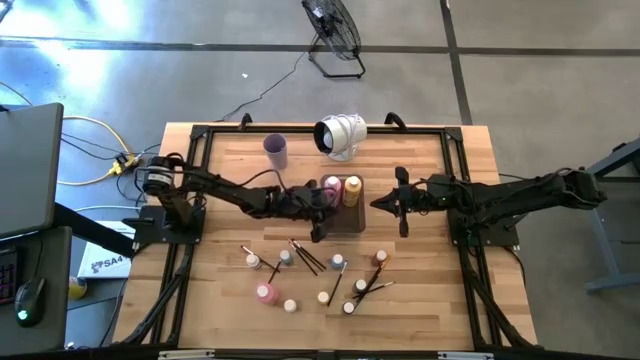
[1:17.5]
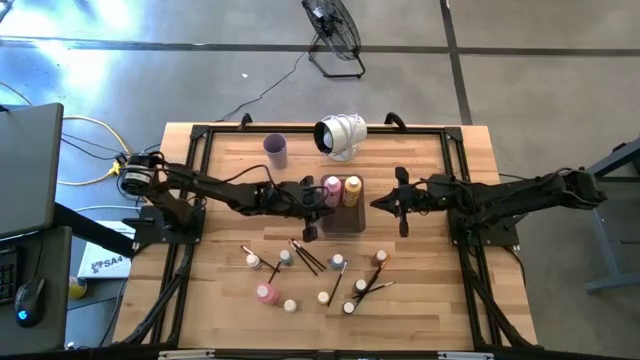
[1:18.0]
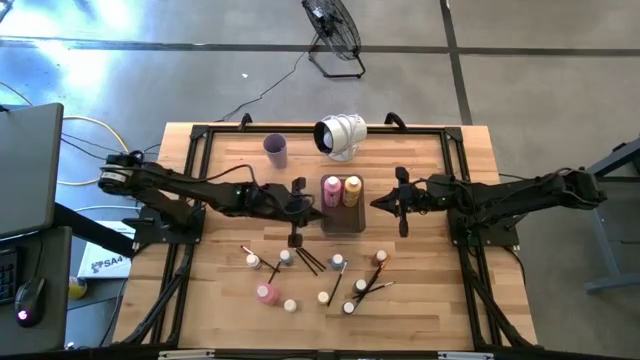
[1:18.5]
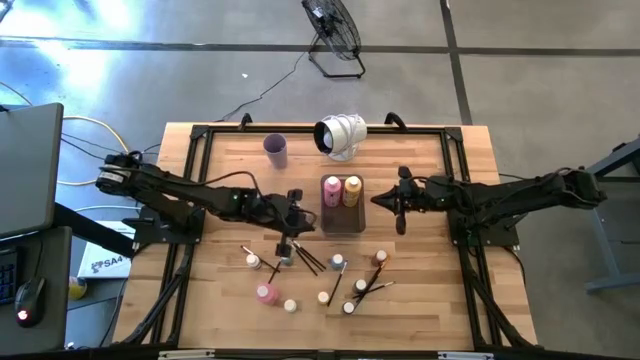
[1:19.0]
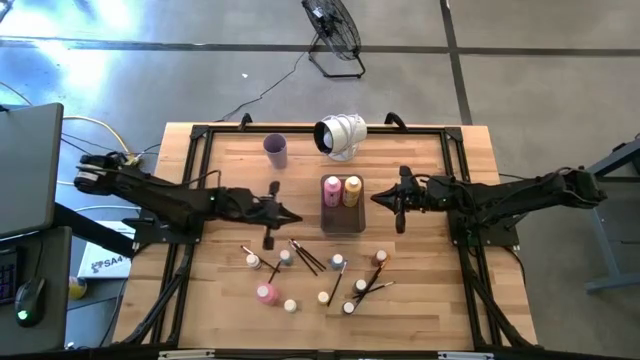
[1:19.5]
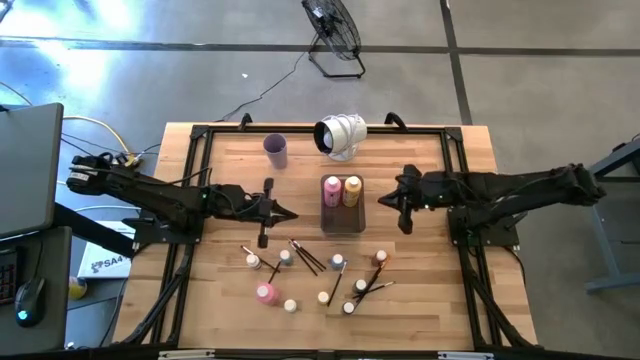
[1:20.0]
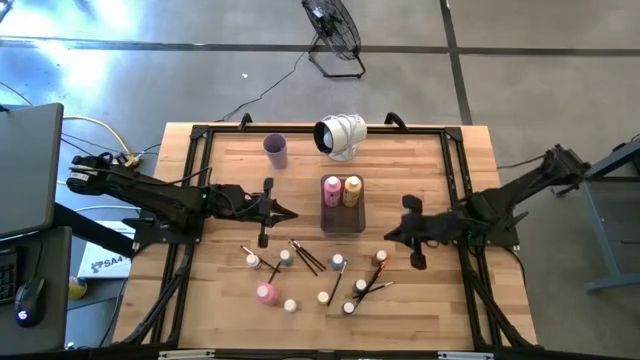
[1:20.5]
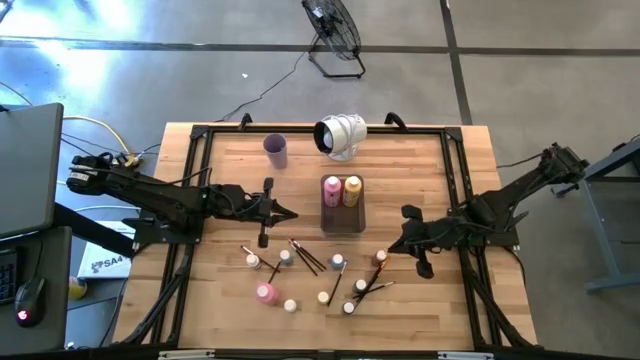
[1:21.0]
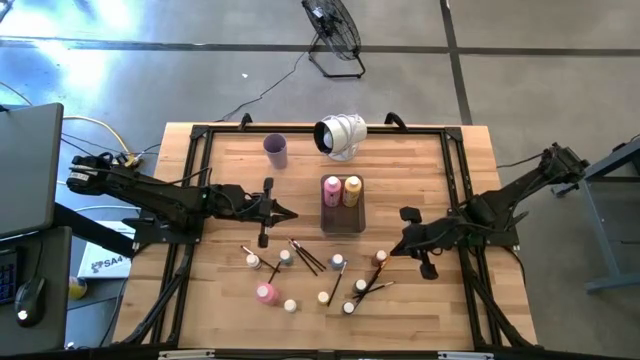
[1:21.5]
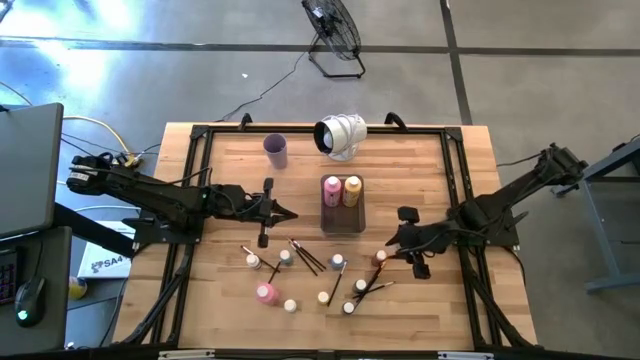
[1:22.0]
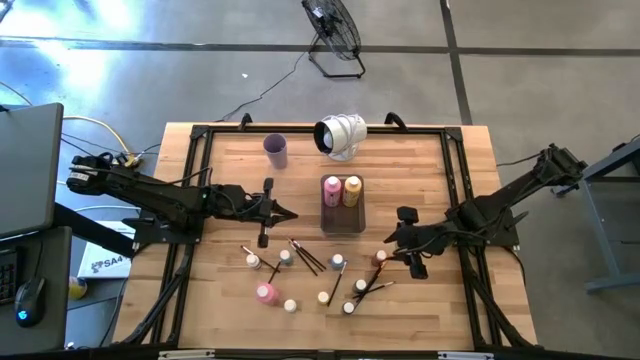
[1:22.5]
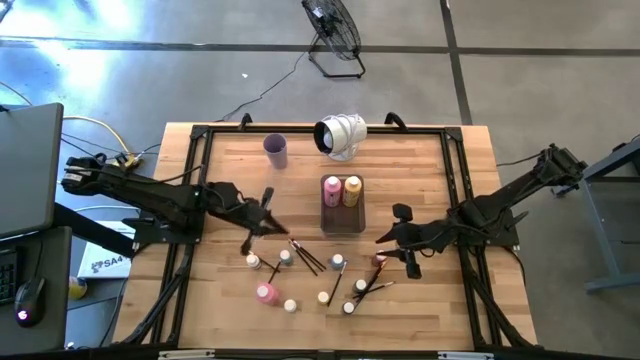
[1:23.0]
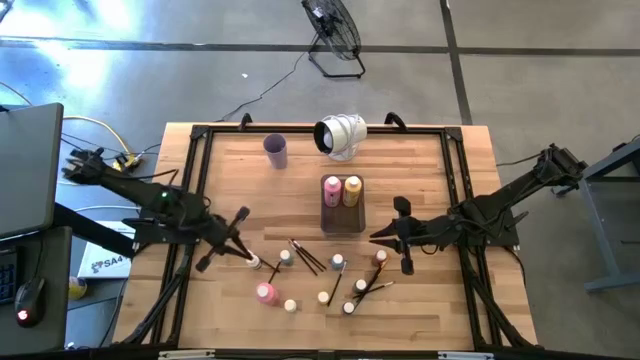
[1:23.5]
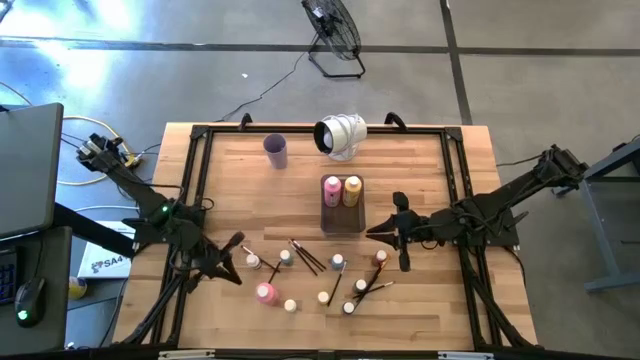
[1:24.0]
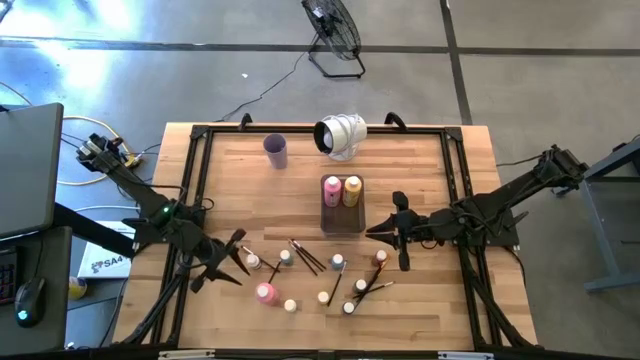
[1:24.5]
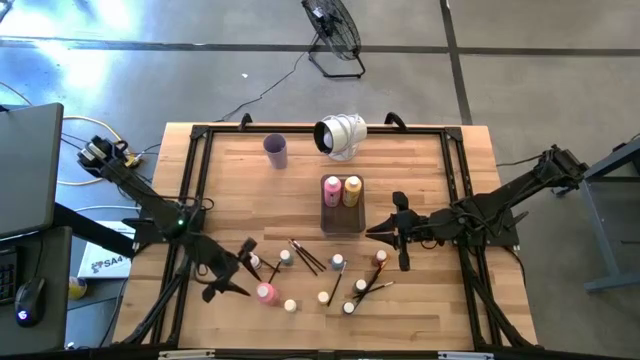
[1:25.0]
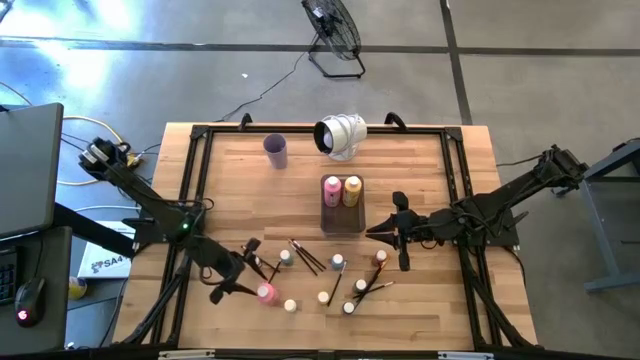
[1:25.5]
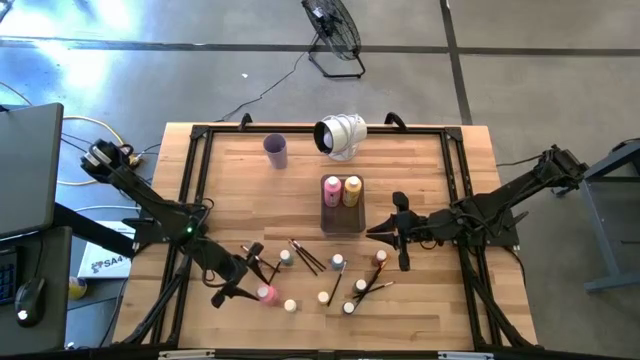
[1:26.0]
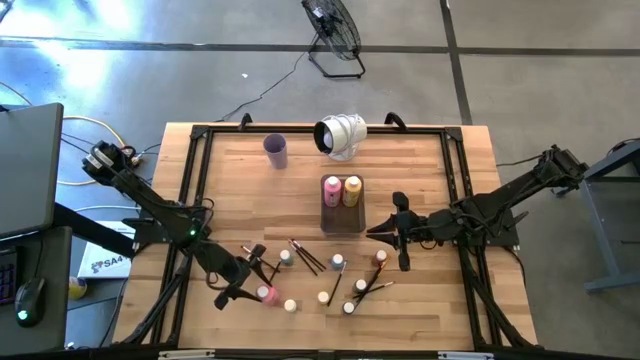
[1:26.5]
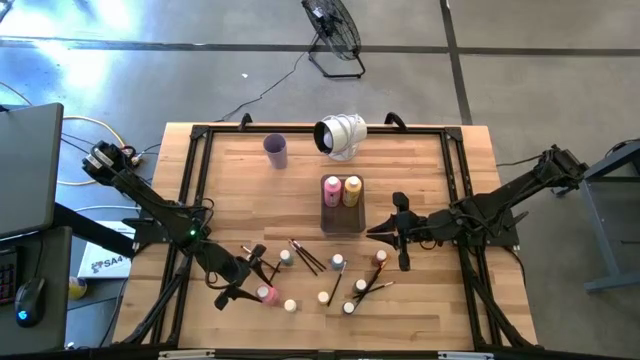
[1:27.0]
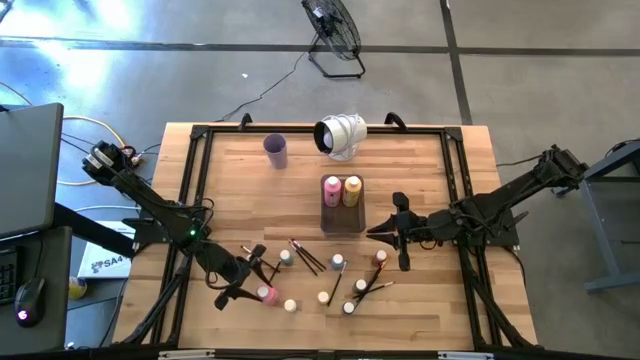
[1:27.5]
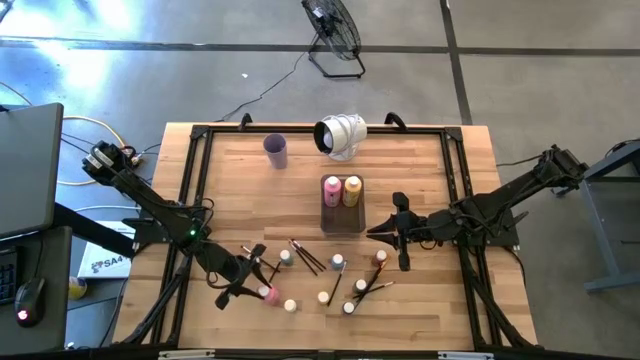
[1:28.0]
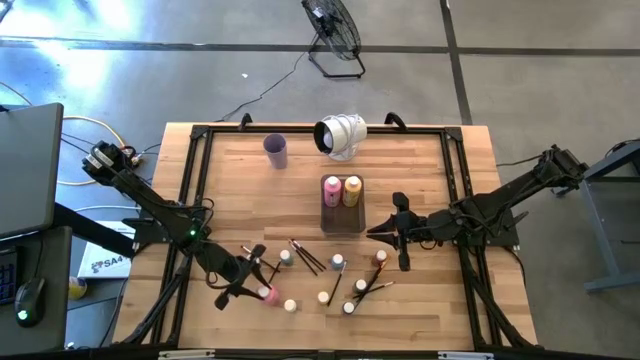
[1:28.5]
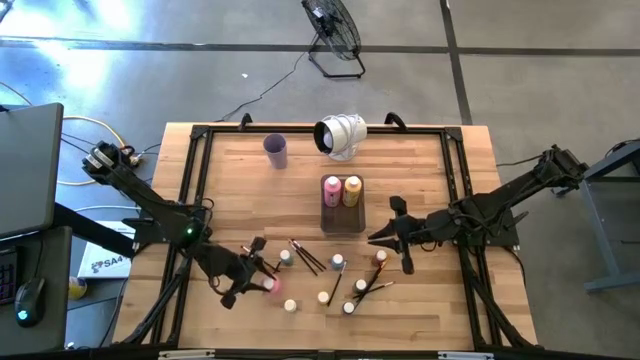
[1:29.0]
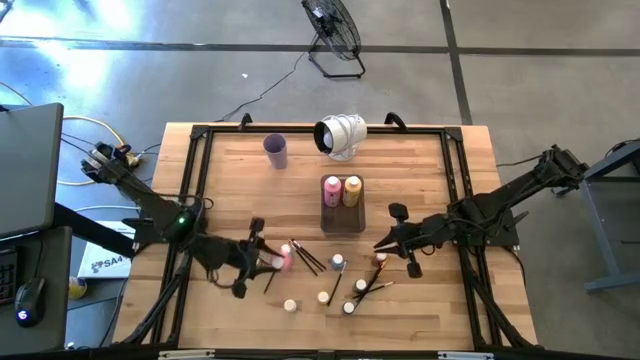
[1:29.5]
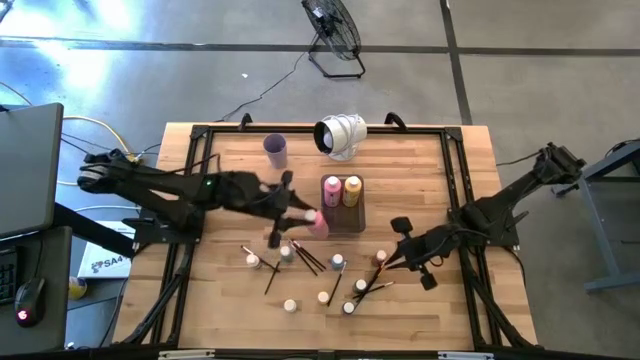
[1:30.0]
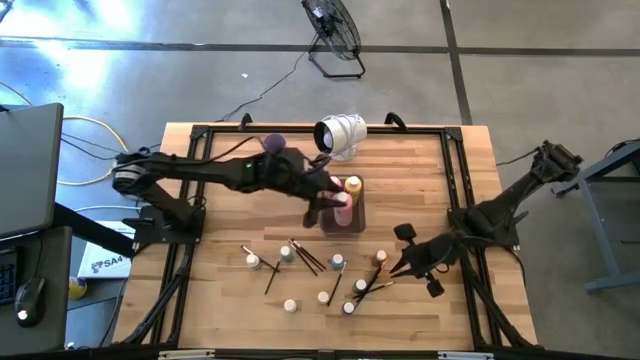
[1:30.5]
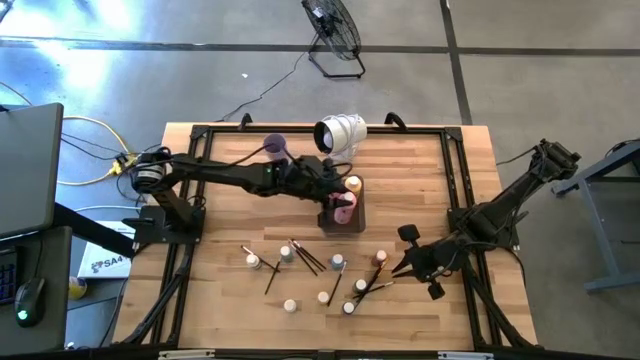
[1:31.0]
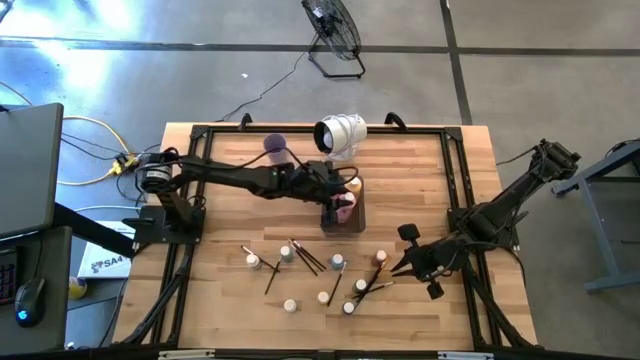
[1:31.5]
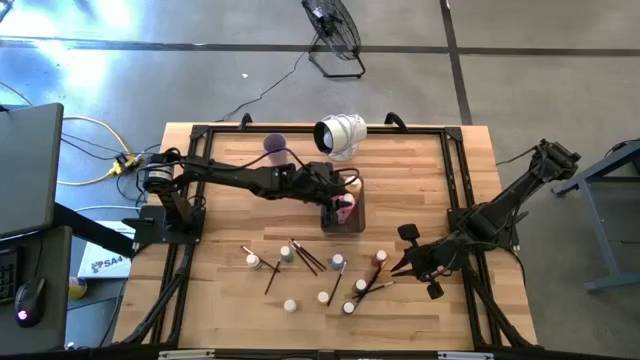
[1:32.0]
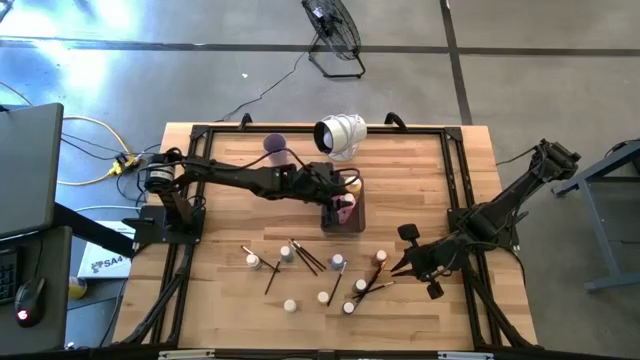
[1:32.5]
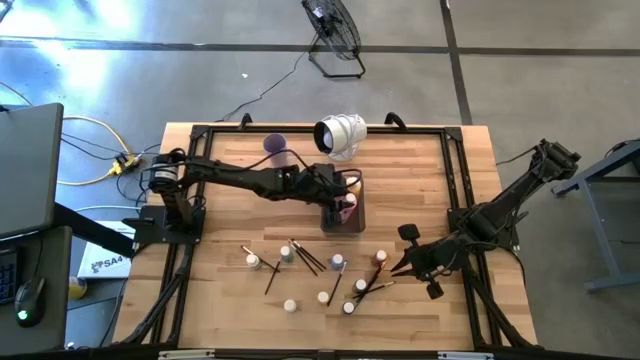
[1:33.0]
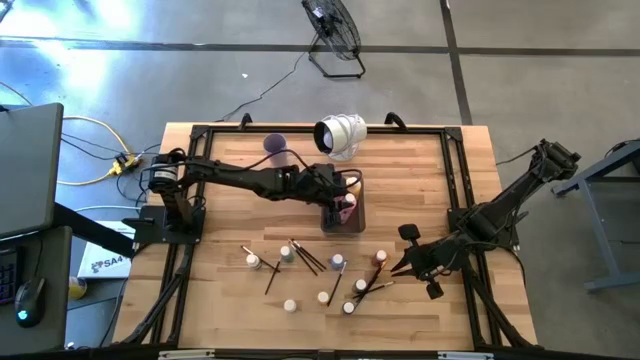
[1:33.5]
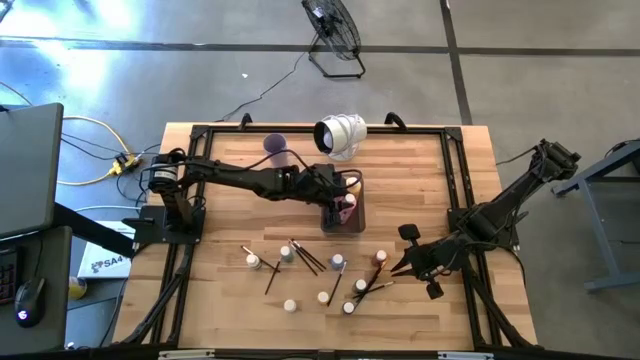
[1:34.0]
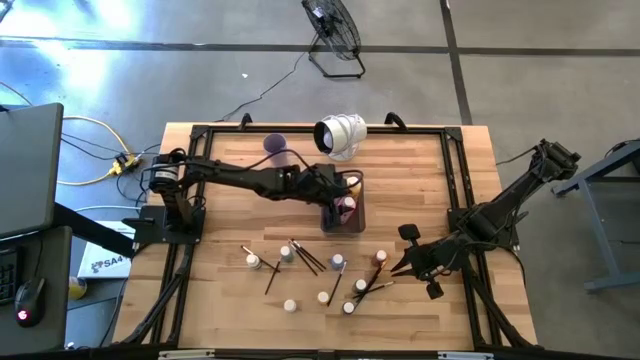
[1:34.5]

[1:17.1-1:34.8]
Task: Pick & Place Paint Supplies
Put the pink paint bottle into the black bin

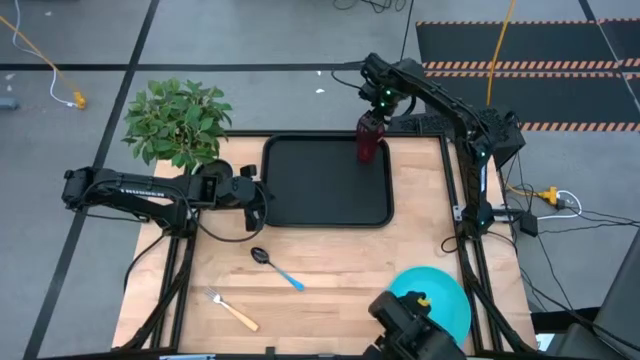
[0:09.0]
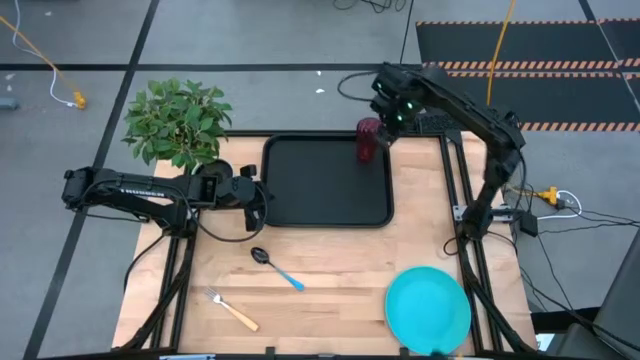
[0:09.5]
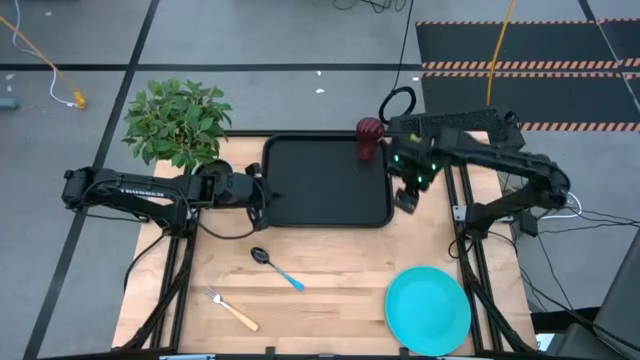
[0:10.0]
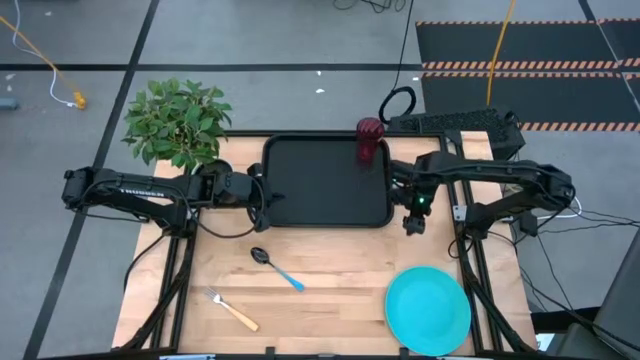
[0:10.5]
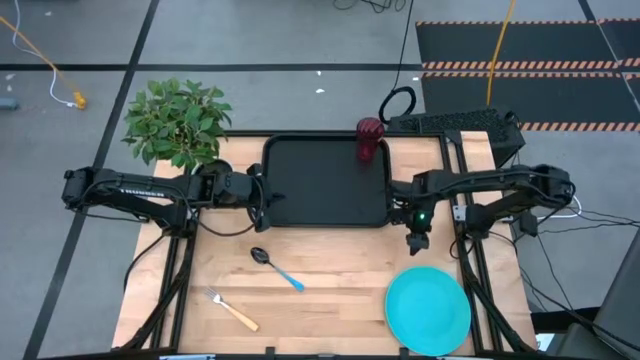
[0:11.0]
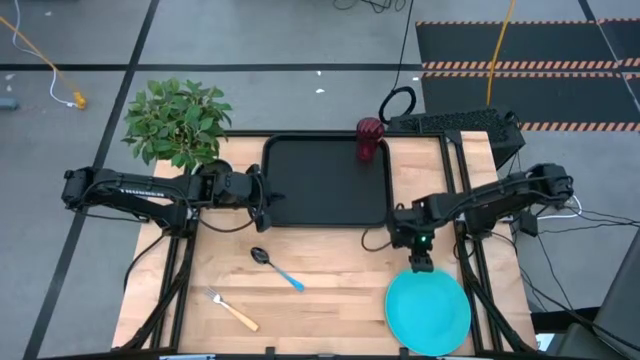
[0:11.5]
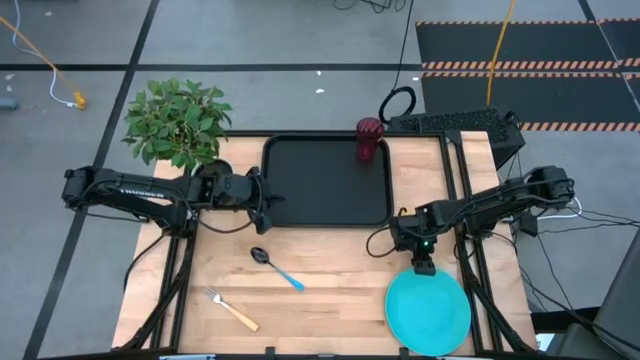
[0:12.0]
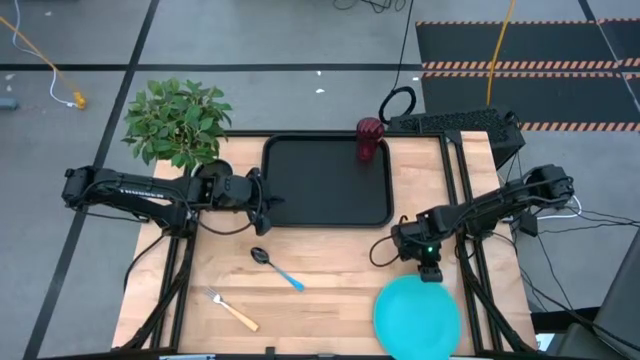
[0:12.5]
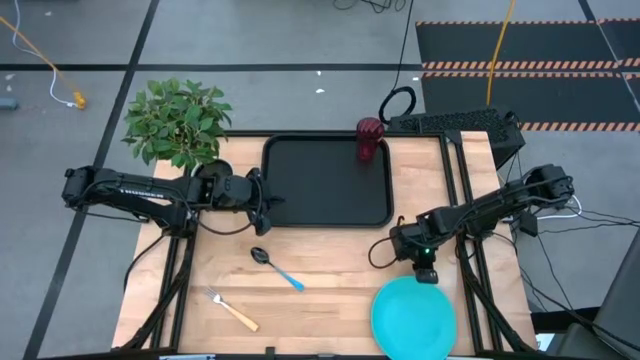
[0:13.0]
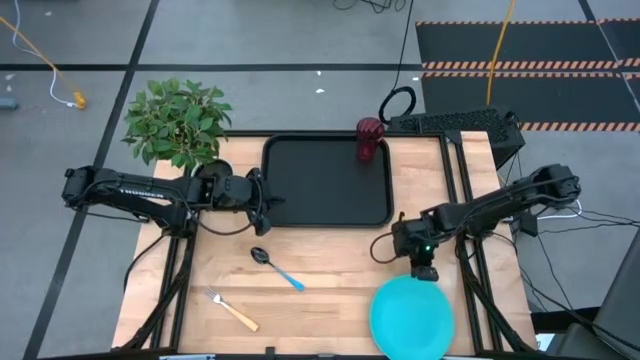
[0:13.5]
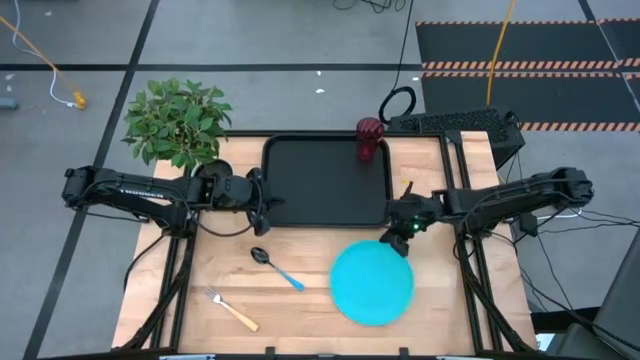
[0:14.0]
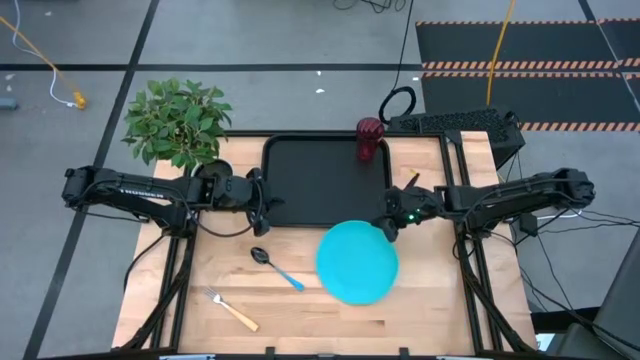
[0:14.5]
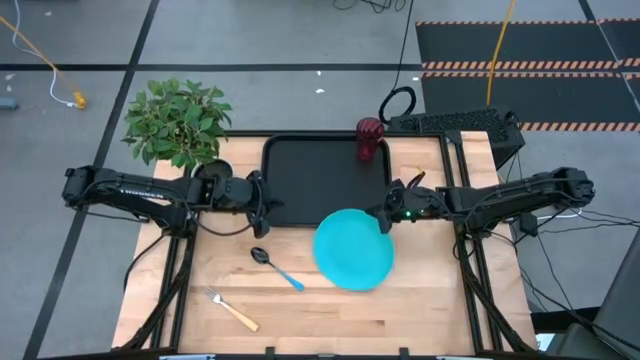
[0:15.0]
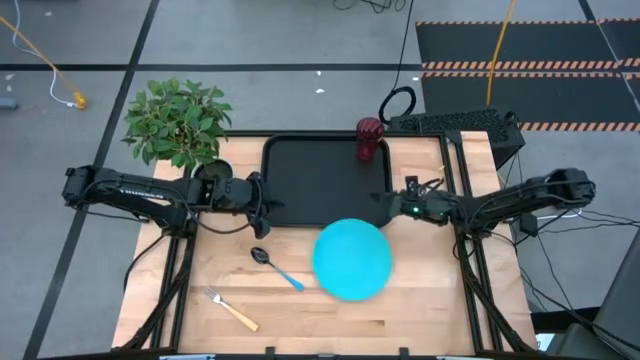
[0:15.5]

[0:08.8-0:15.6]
Task: Pick and place plate/cup/fork/spoon on tray
Put the blue plate on the black serving tray to the bottom right of the red cup
